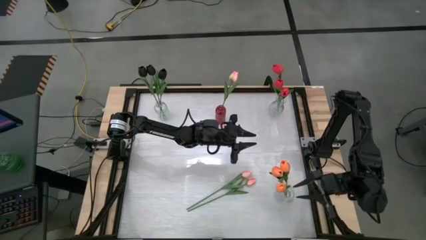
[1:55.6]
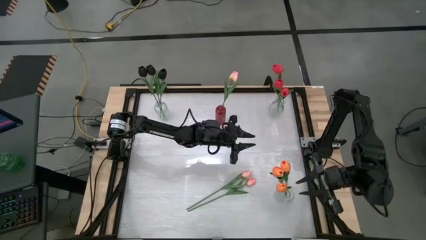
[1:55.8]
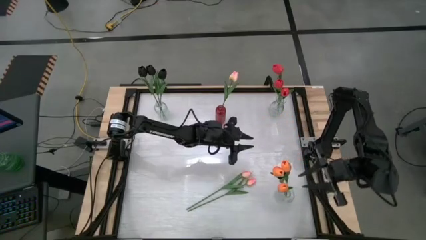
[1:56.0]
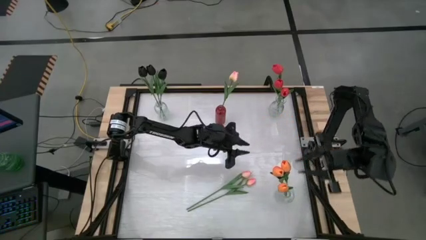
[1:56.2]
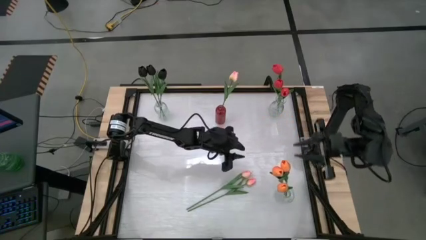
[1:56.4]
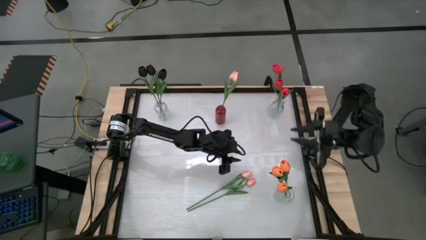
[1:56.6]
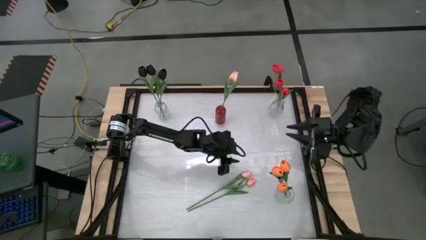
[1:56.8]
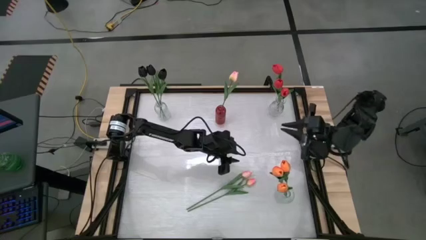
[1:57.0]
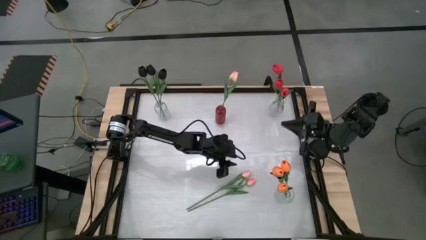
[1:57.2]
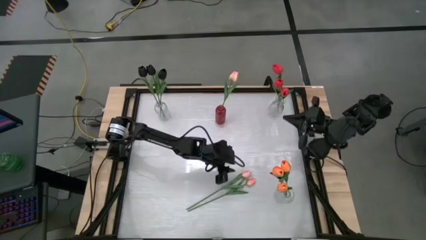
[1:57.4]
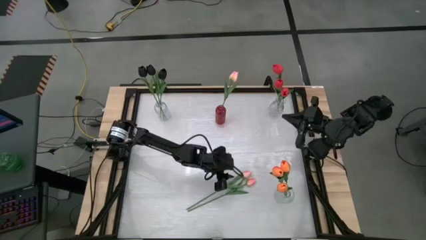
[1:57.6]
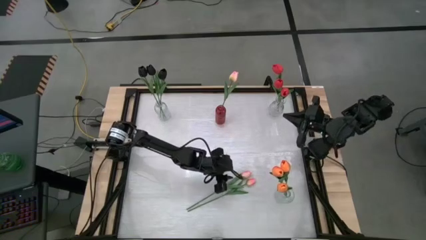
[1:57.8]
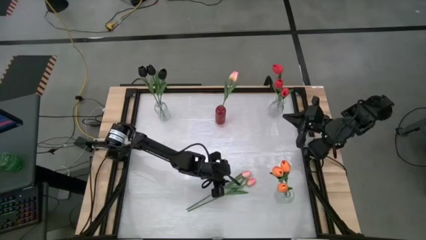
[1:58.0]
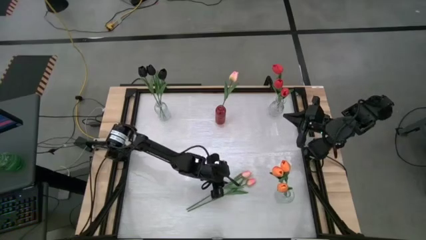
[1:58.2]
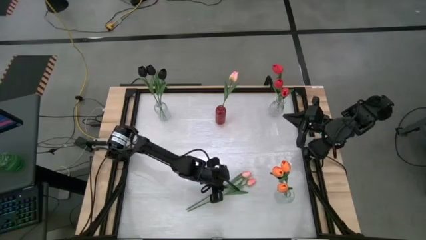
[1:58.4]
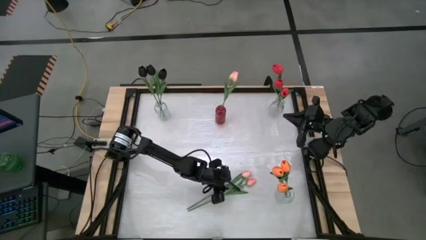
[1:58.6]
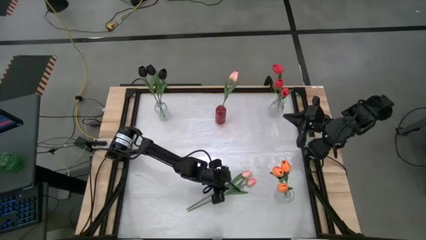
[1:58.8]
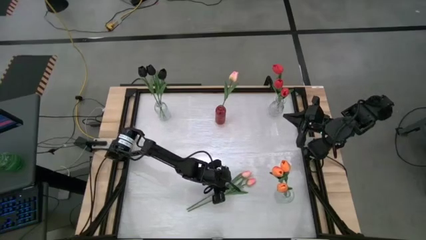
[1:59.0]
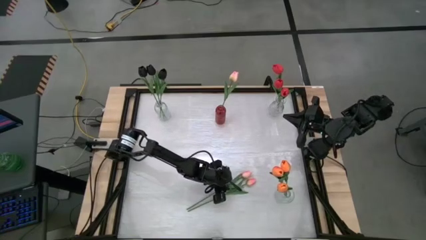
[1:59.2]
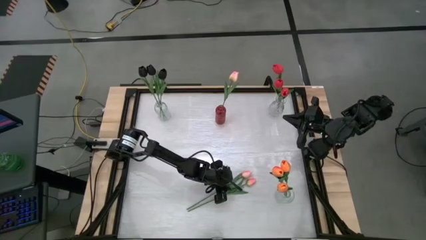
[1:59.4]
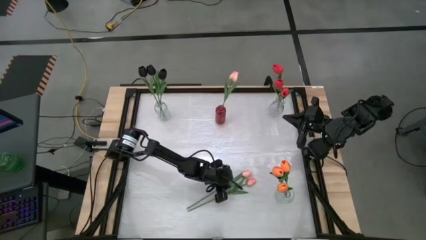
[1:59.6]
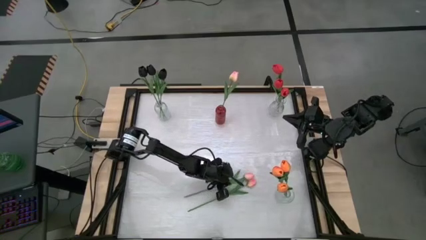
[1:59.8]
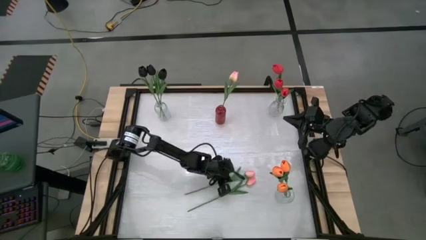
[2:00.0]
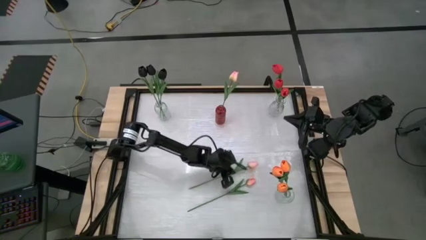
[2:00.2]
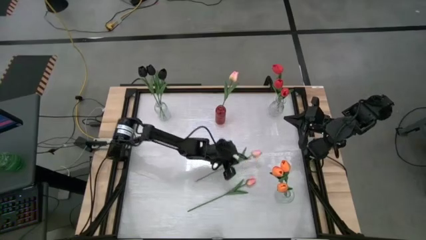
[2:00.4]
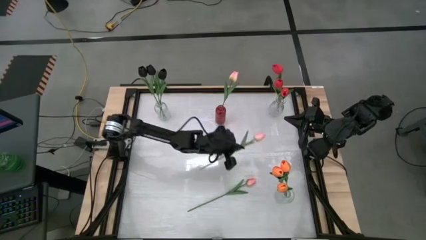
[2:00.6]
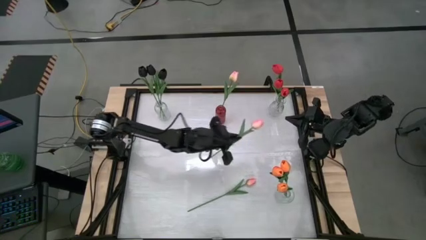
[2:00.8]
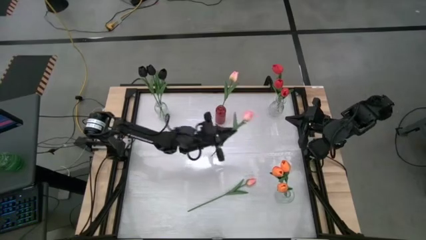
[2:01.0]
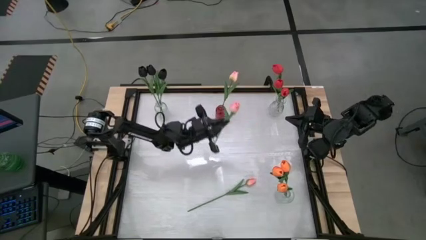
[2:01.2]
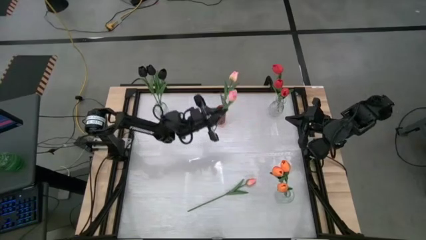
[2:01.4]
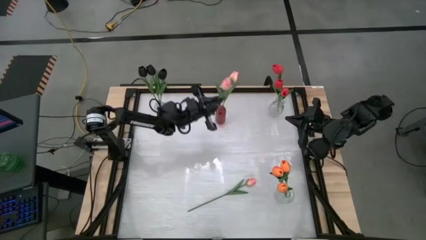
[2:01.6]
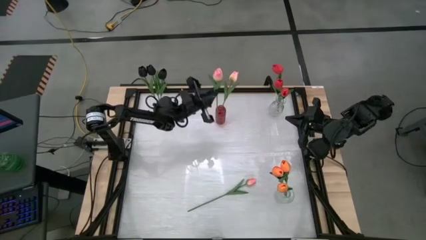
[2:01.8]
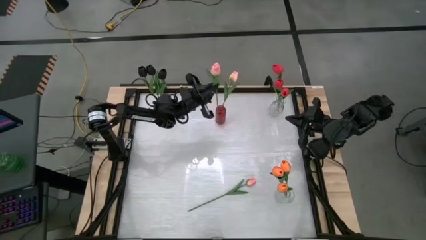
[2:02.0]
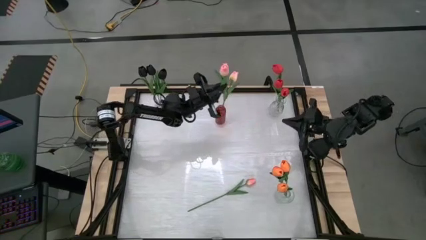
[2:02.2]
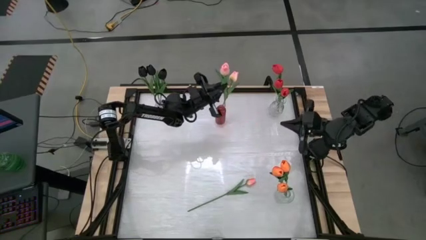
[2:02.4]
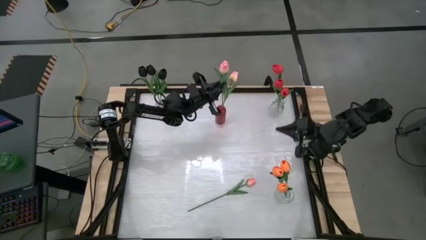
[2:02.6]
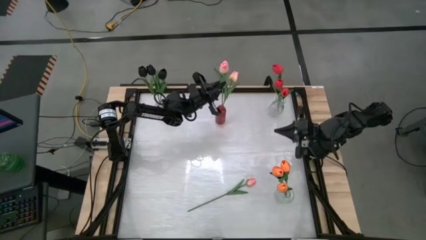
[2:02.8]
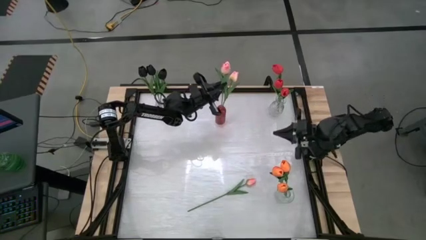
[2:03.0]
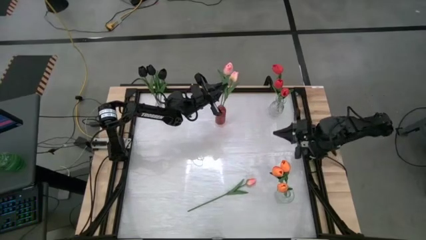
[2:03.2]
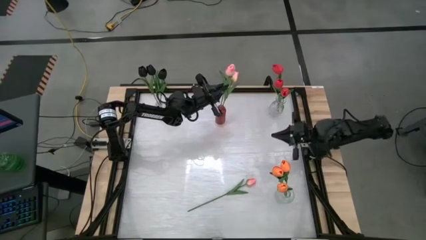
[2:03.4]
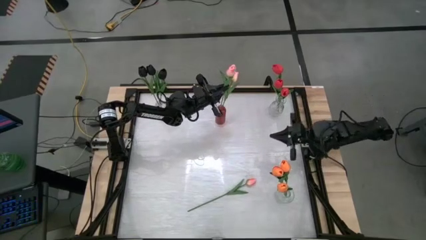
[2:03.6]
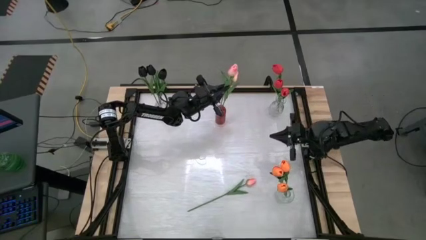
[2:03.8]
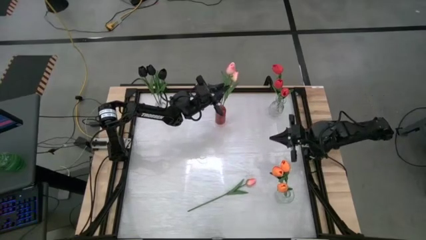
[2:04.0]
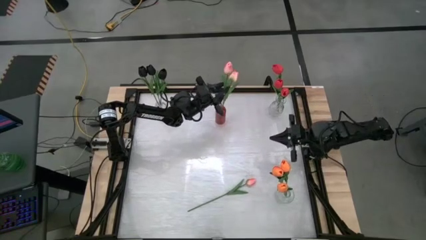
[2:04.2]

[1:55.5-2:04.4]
Task: Sort flowers into vase by color
Put the top pink flower into the red transparent vase

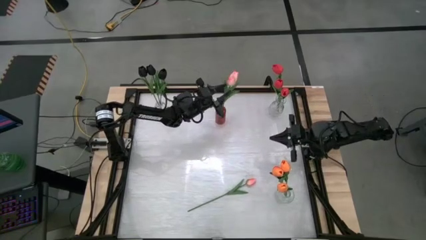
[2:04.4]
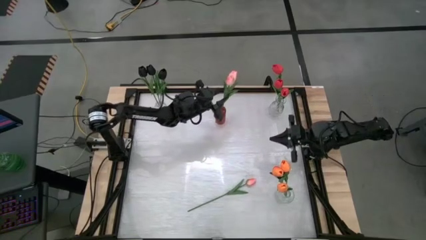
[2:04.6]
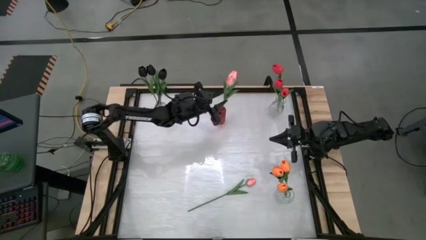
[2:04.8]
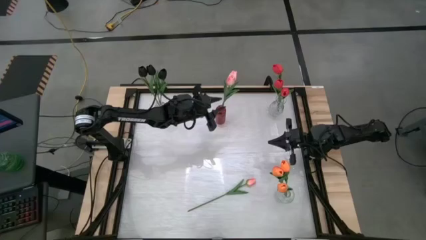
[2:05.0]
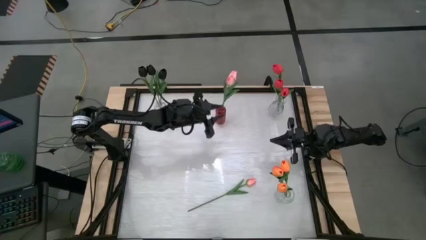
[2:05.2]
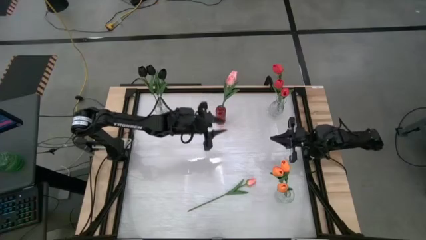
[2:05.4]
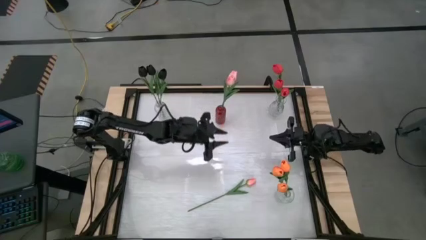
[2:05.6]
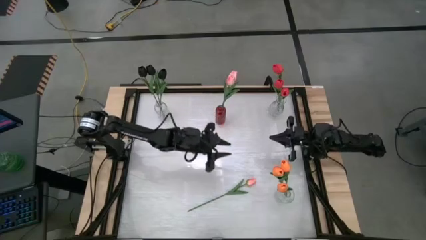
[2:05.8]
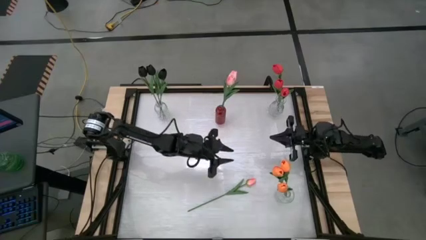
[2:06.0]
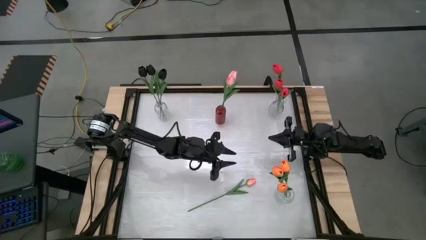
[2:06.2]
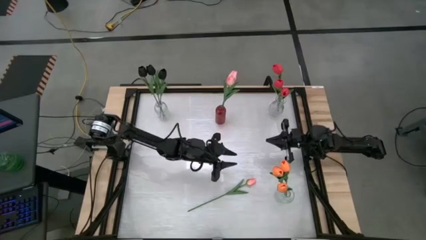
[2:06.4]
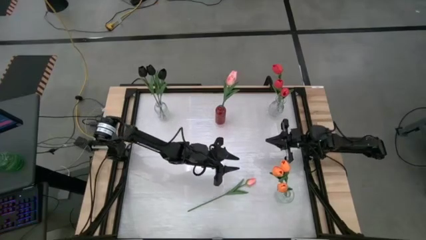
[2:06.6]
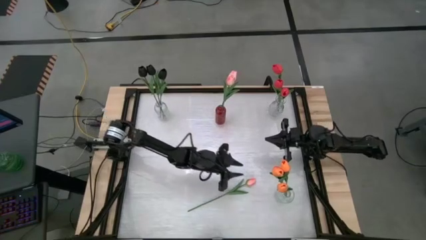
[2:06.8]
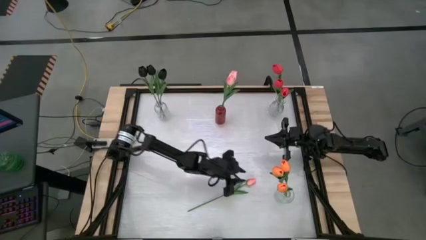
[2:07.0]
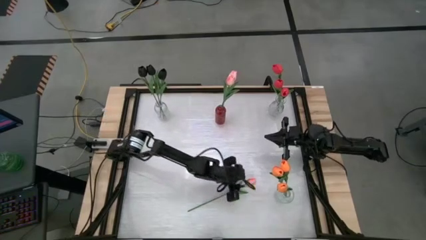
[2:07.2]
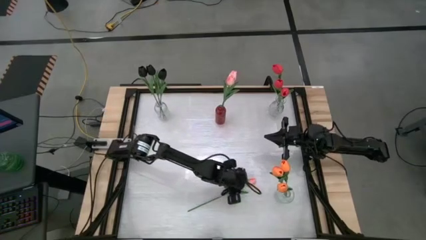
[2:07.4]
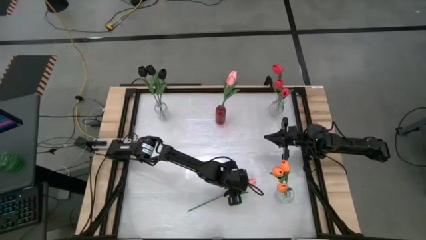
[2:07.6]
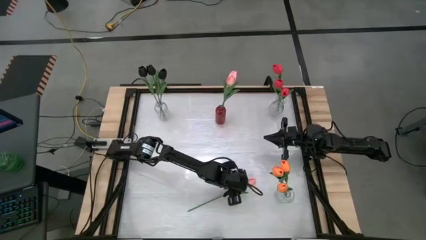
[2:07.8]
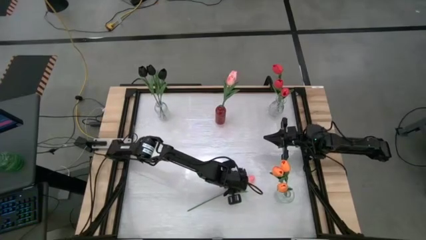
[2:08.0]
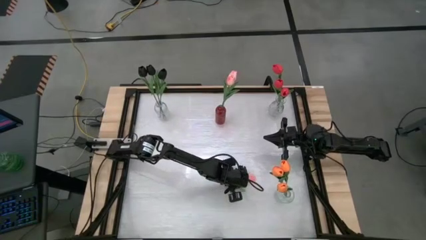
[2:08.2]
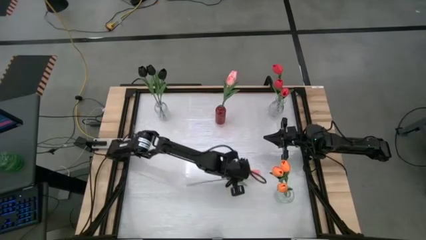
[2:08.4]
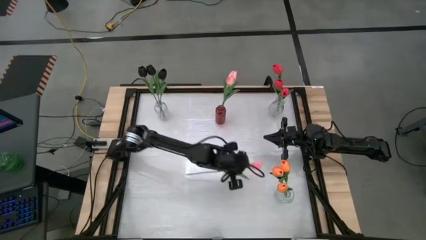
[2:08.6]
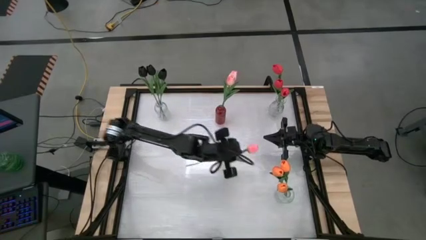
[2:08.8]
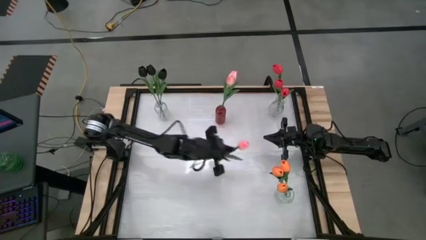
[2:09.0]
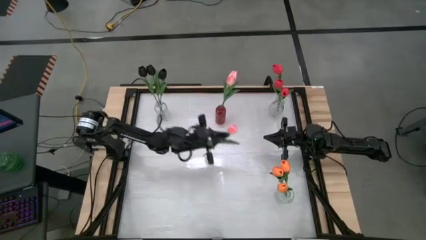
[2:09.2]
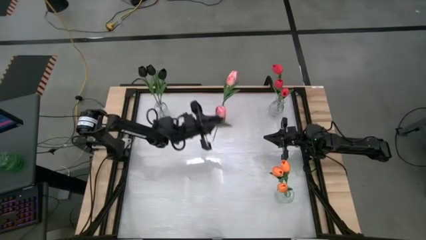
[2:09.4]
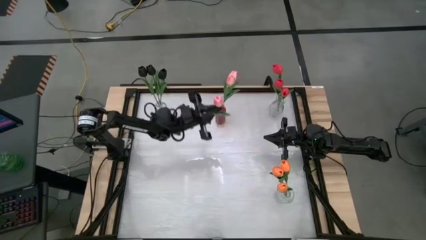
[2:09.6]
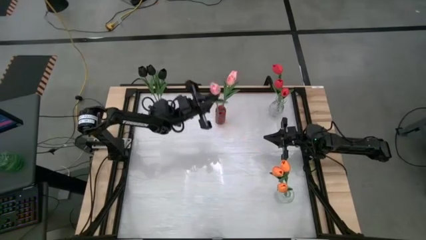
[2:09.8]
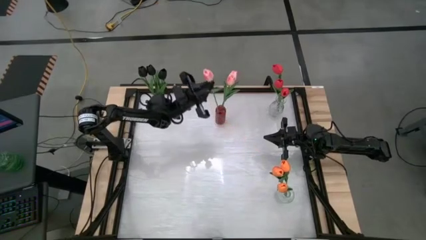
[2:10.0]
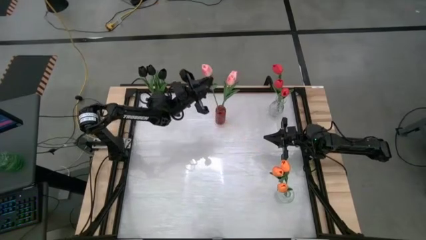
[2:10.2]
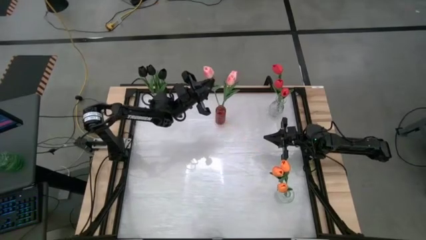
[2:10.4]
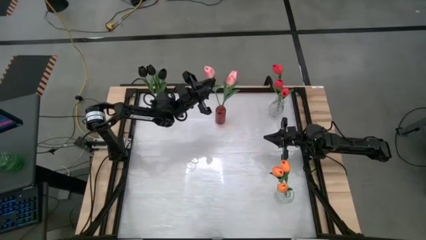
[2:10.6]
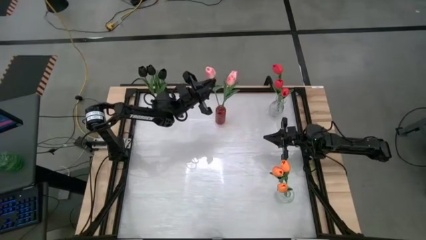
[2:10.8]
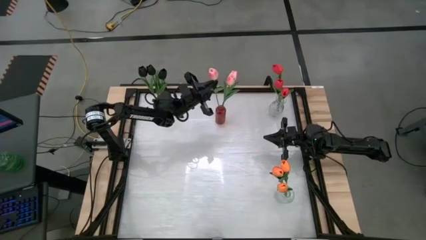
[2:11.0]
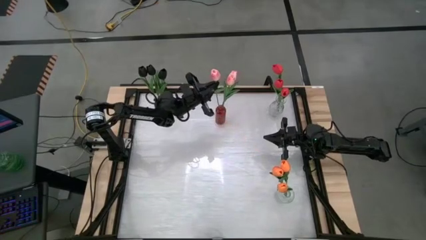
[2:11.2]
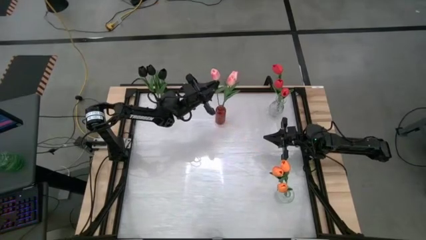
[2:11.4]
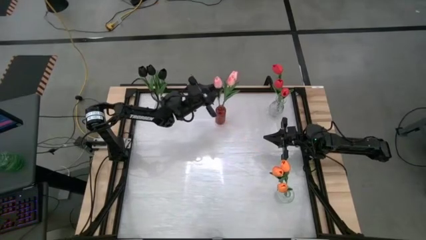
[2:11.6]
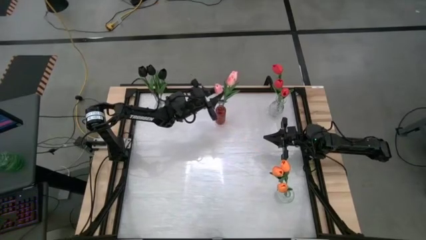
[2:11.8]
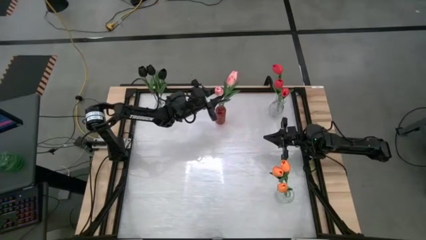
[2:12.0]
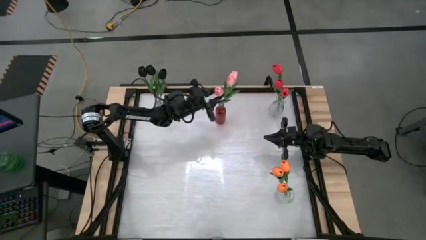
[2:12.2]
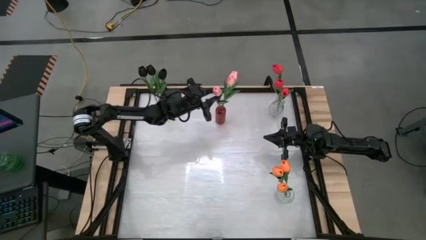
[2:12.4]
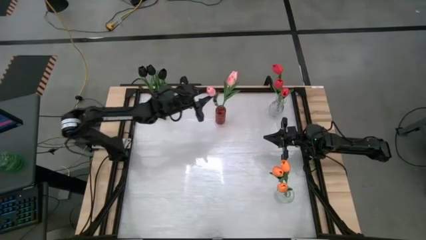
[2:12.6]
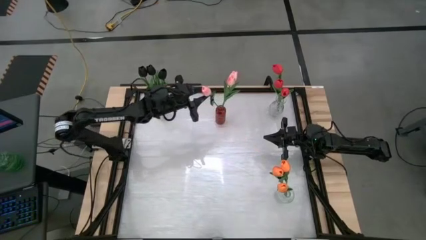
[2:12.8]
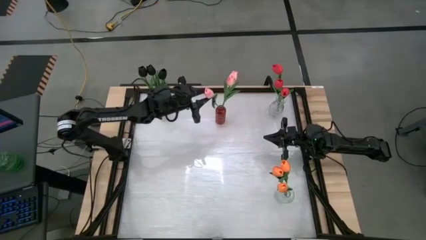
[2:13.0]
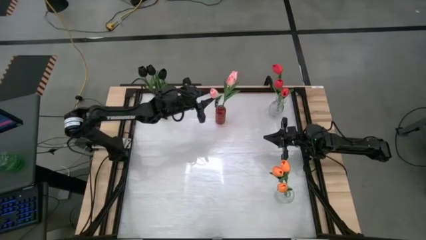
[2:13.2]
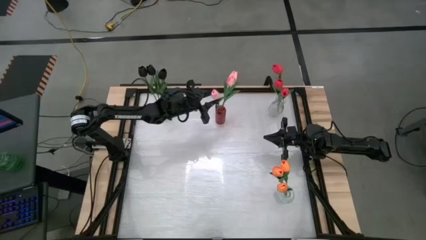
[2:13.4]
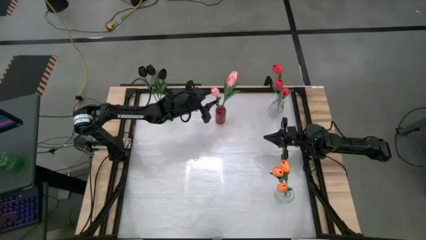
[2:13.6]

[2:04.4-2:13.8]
Put the pink flower into the red transparent vase
